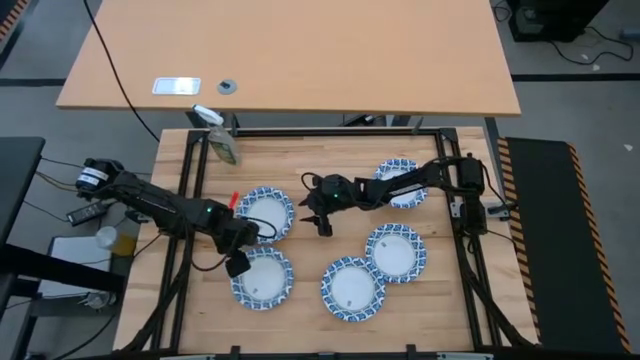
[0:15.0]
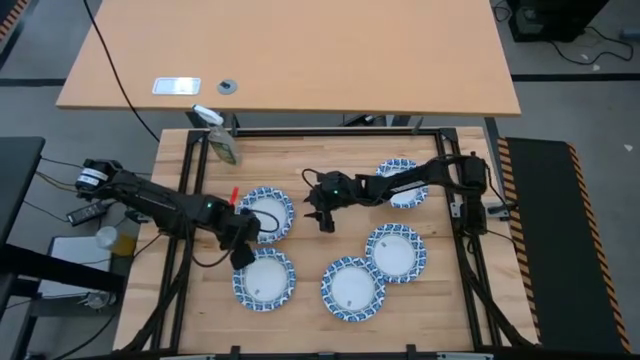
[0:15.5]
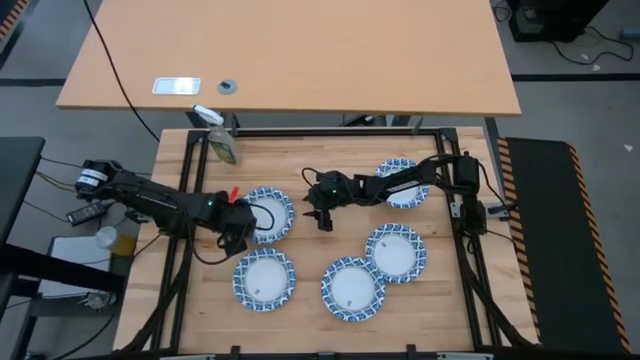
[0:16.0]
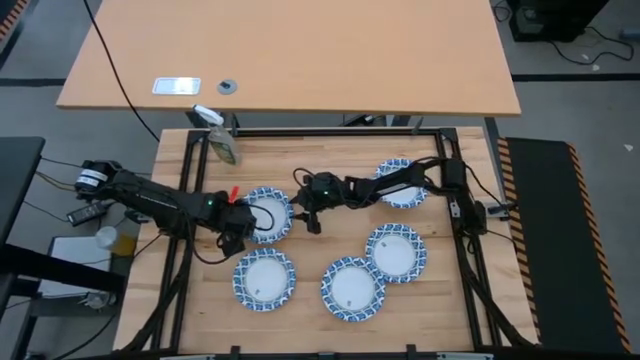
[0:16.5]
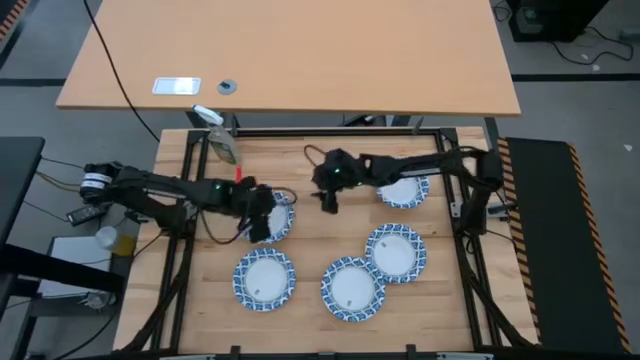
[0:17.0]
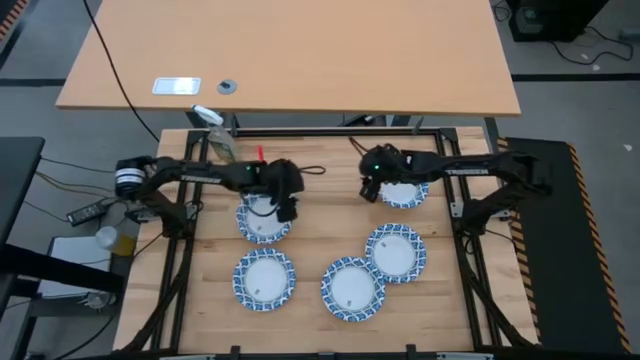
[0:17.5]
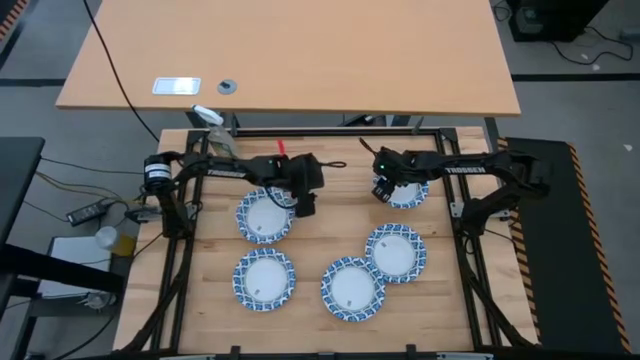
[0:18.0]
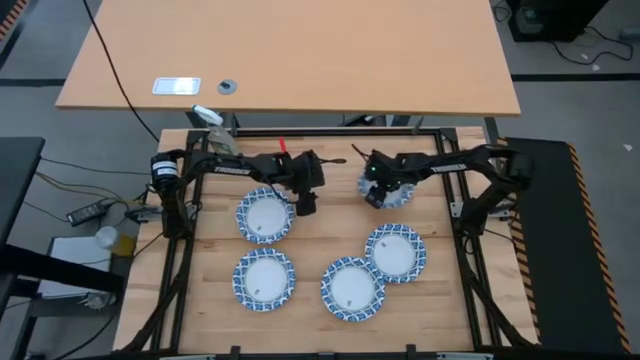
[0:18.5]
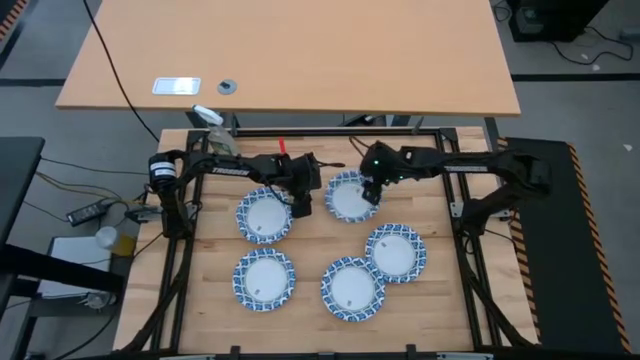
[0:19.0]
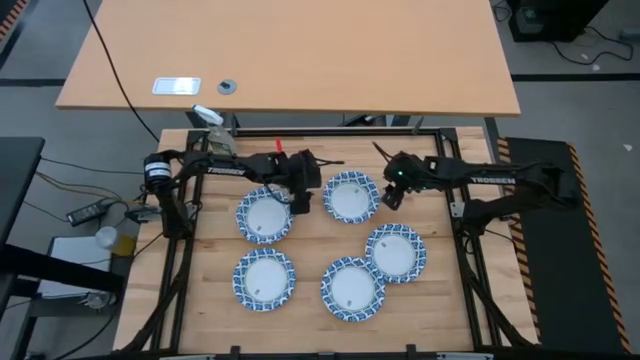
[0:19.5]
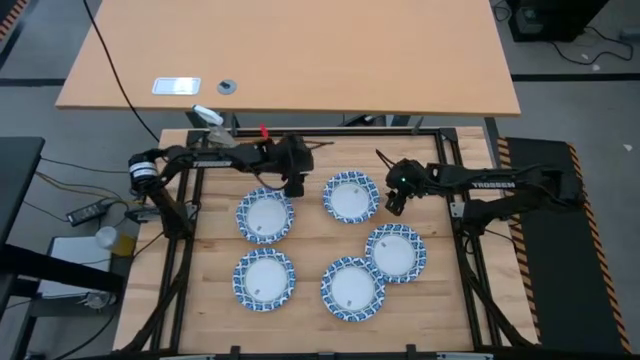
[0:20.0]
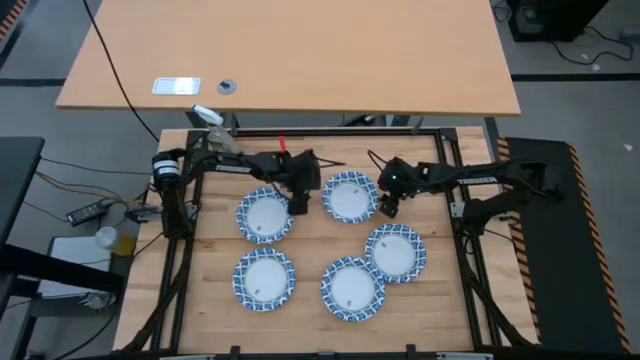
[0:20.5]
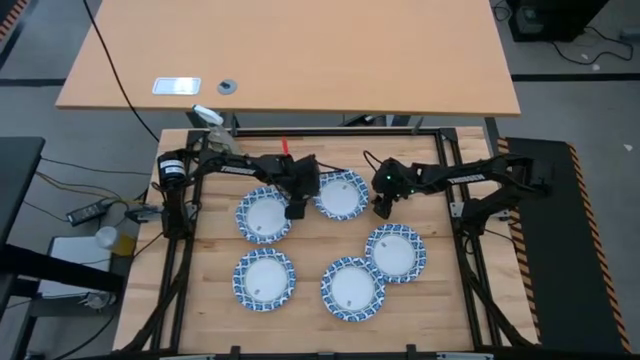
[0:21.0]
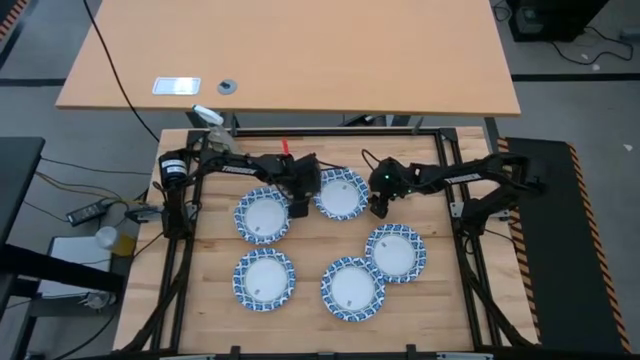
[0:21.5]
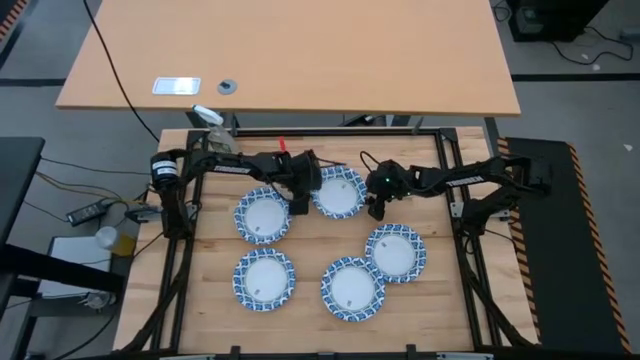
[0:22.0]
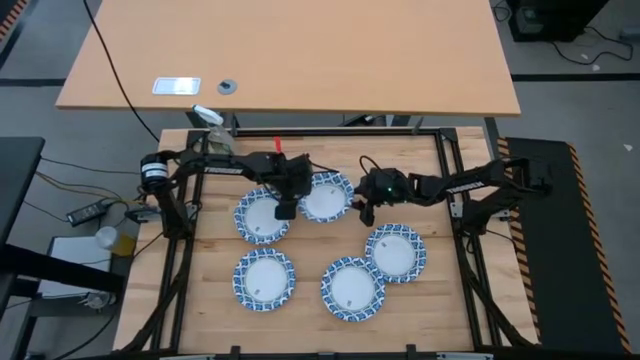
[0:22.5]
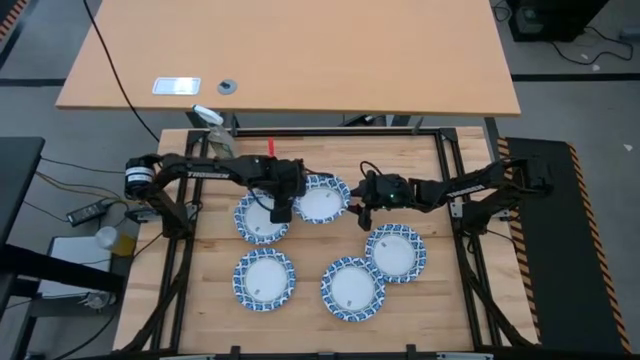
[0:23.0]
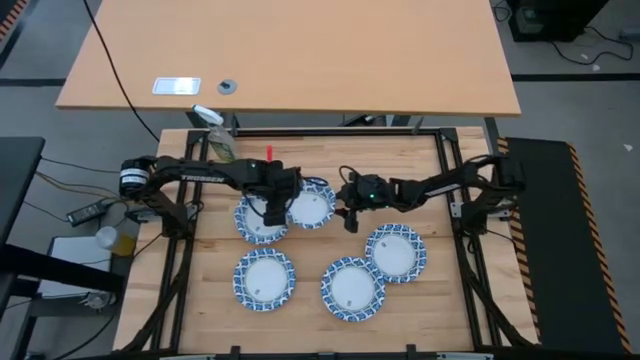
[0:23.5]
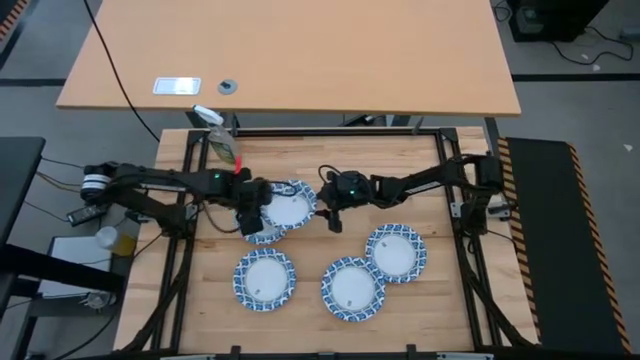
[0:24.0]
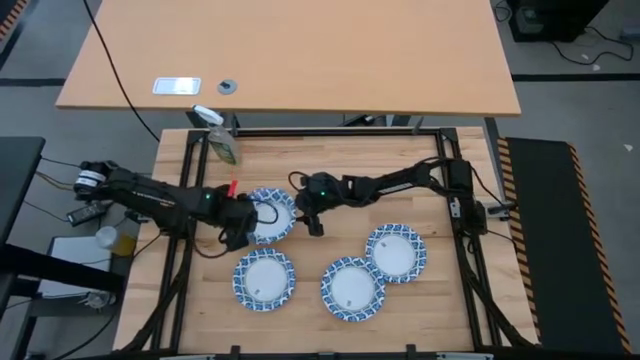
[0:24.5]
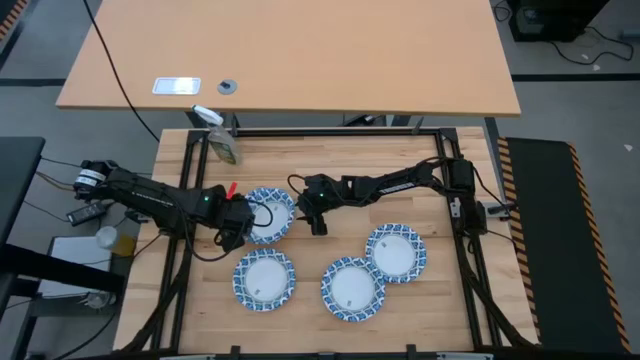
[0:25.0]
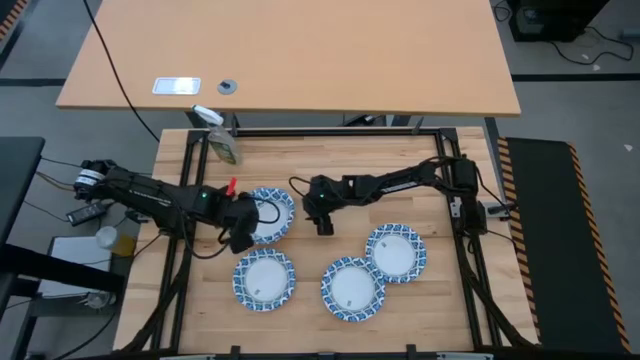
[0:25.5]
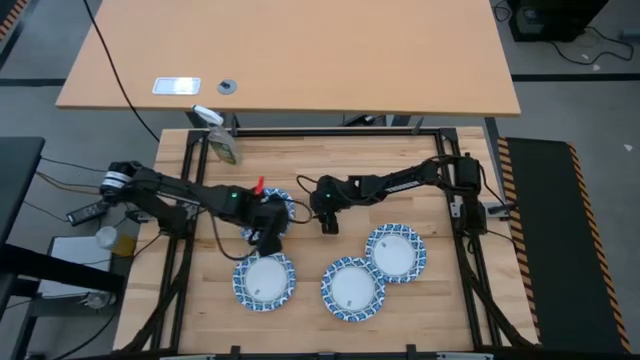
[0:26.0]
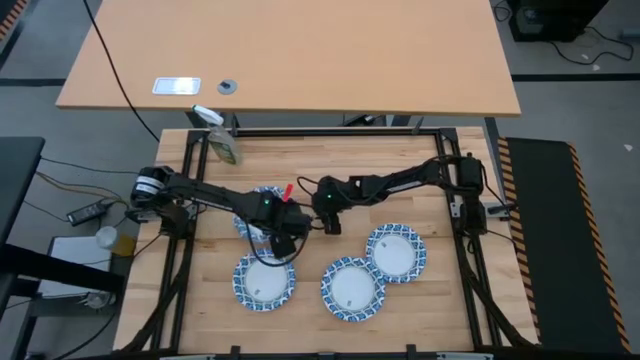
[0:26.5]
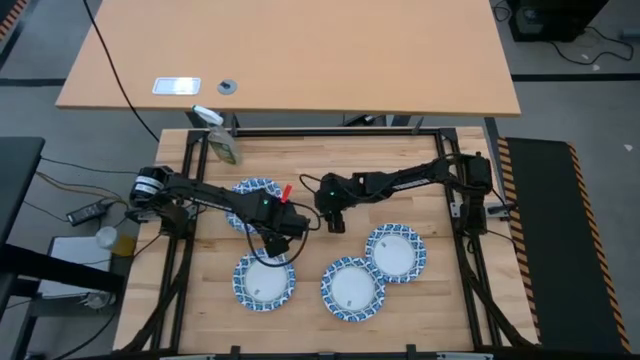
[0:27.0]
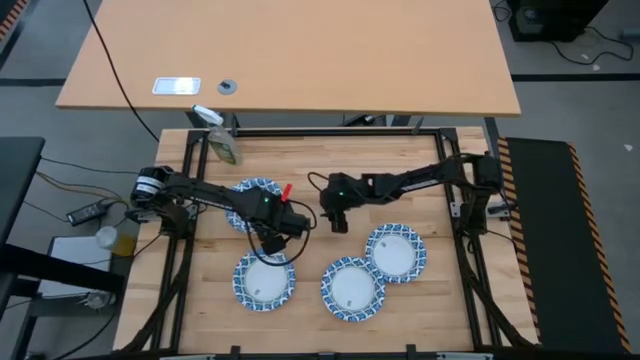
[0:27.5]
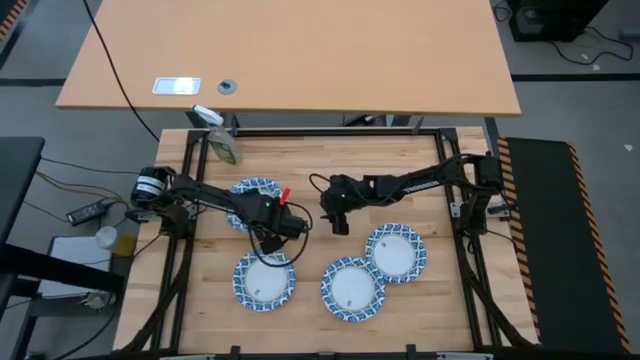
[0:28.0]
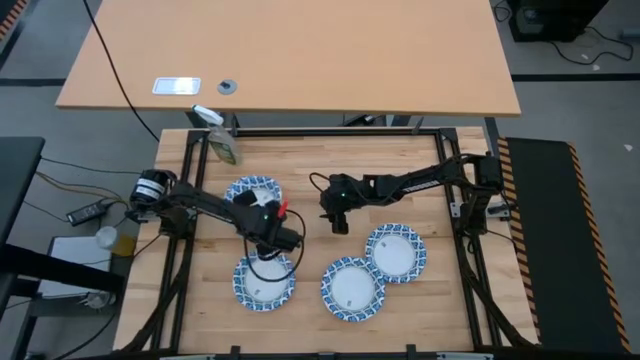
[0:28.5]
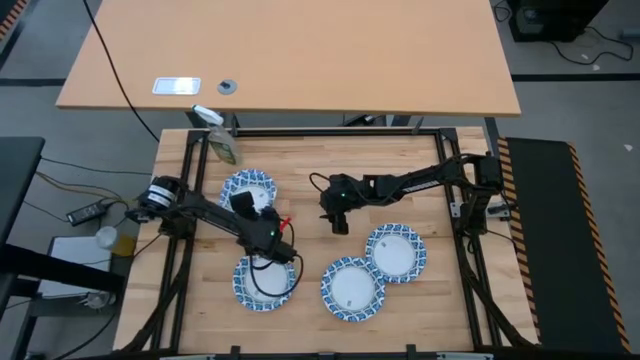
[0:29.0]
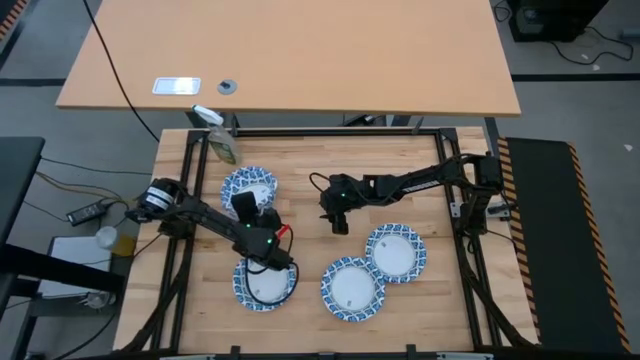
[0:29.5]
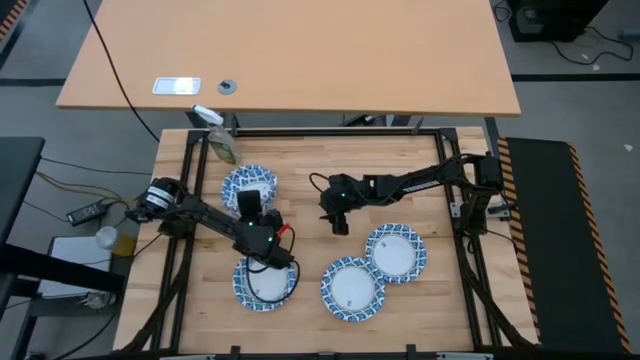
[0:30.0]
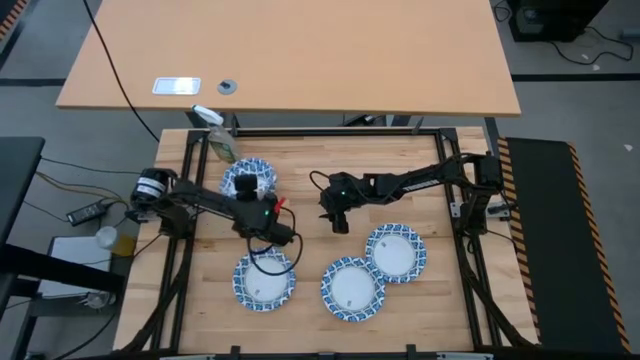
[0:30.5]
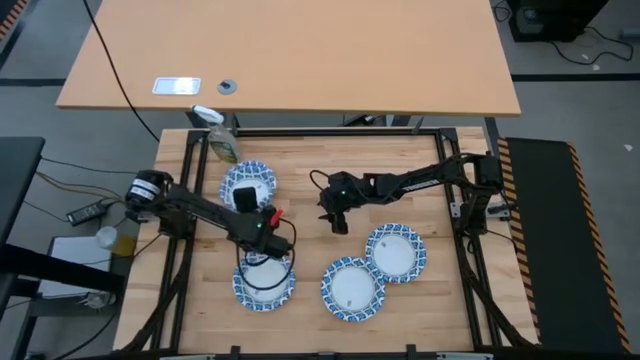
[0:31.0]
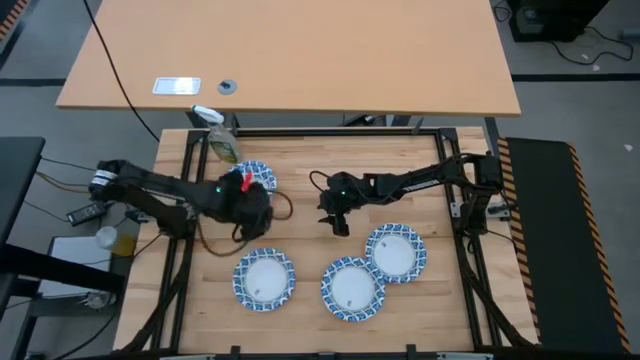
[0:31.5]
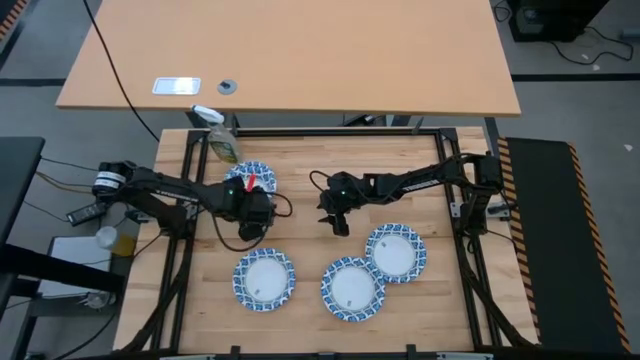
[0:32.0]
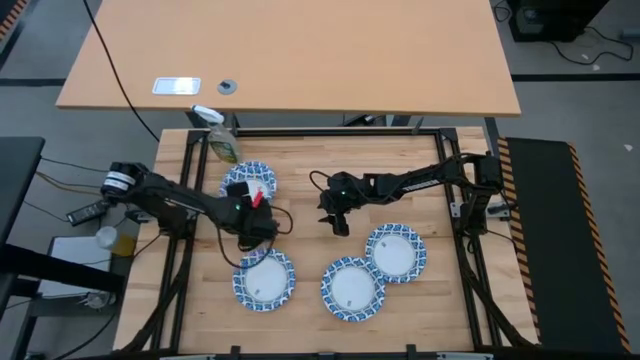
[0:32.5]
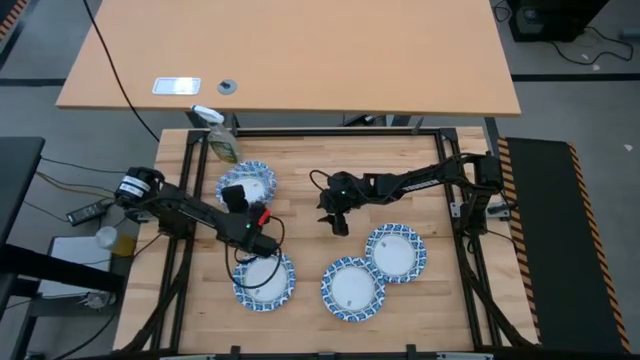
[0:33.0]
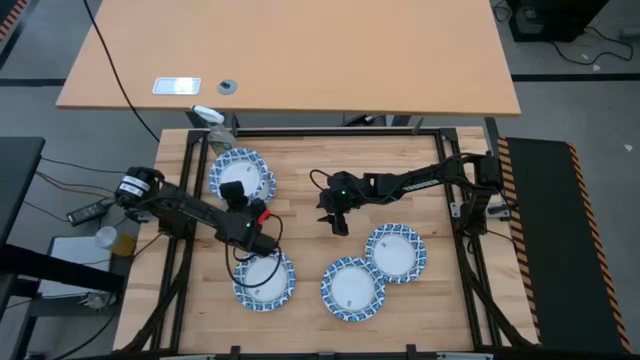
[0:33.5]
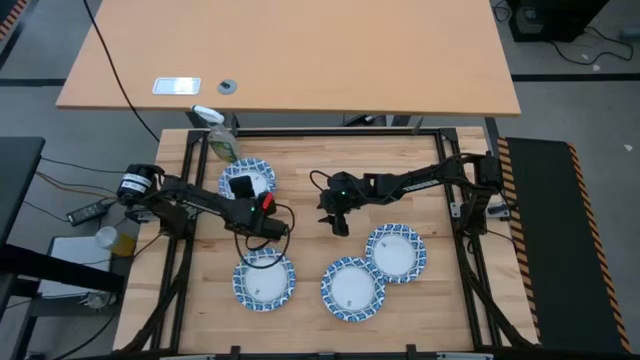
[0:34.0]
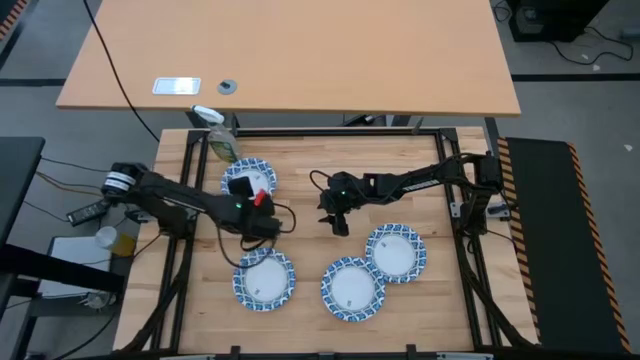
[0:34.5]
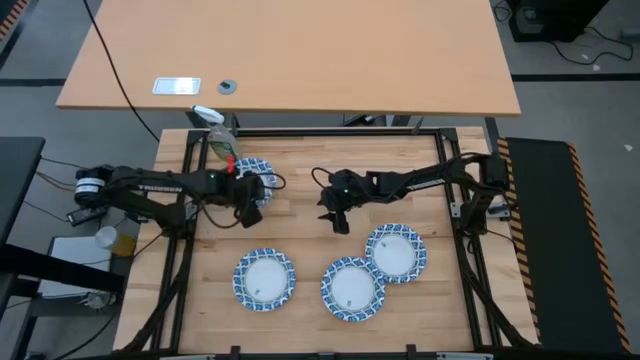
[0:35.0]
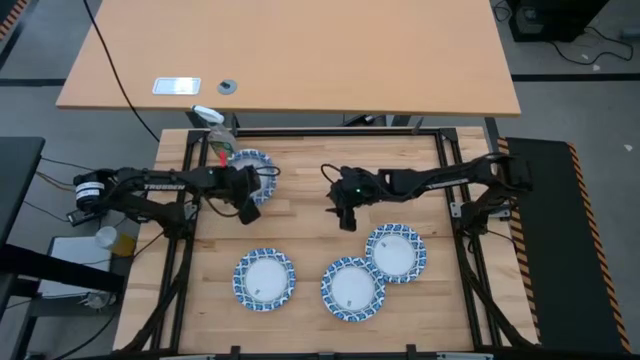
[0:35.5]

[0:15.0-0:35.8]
Stack the white bowl on top of the other white bowl
